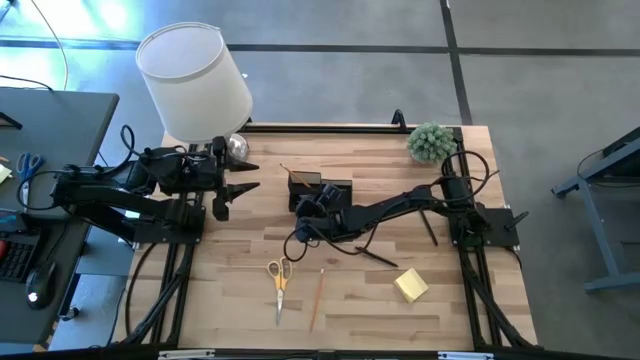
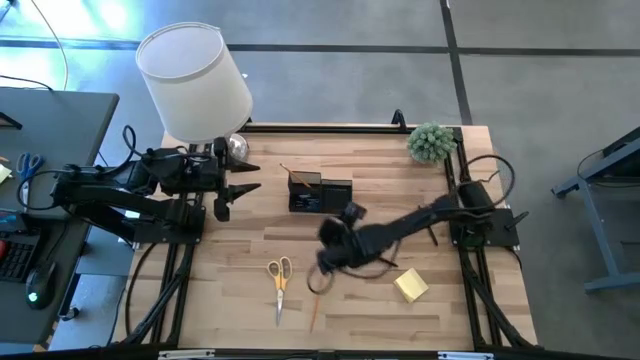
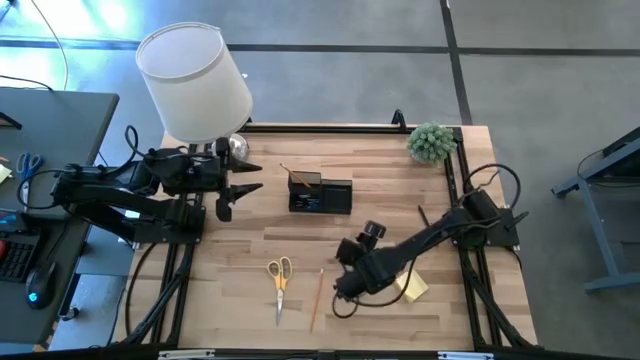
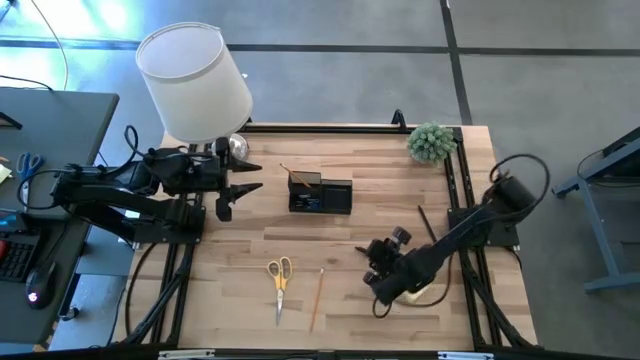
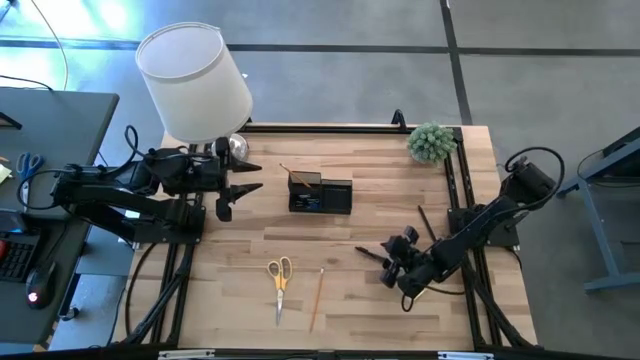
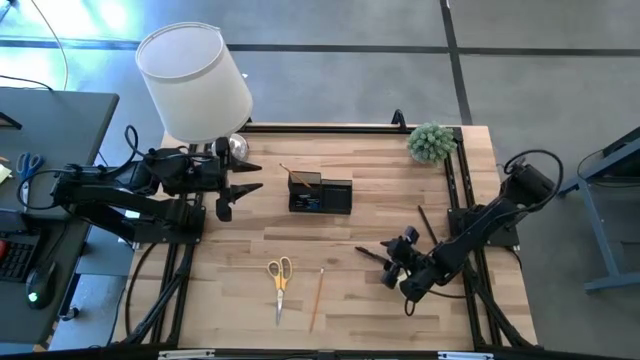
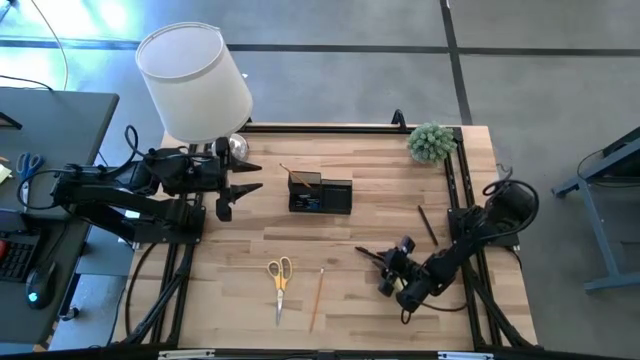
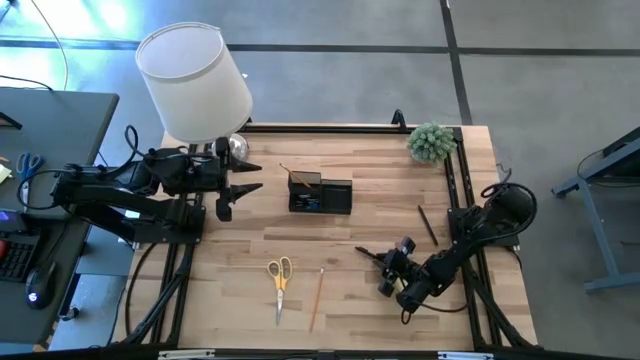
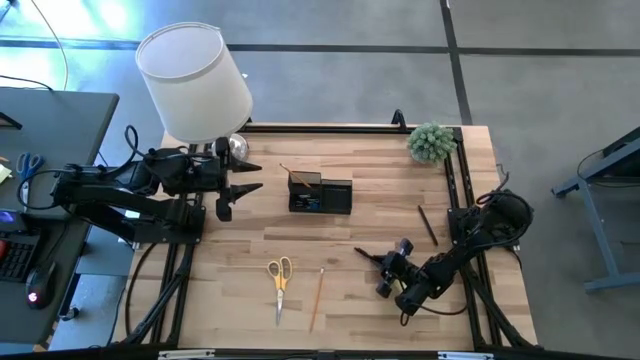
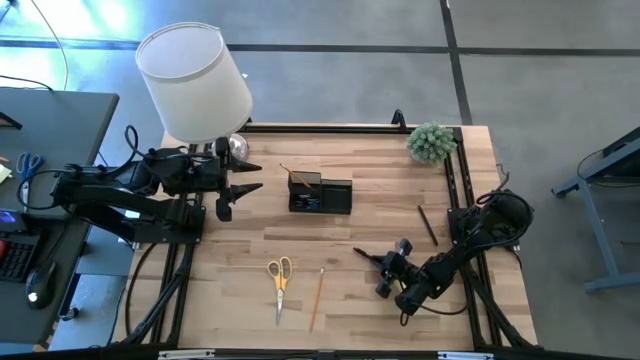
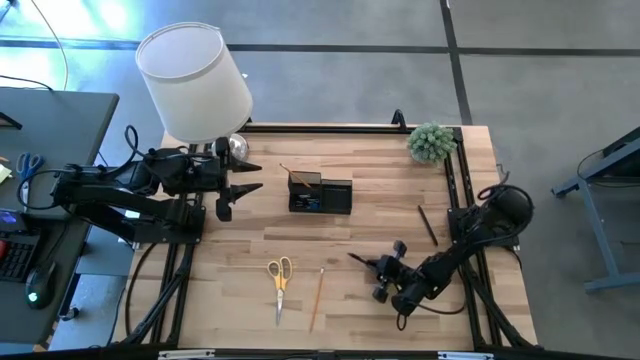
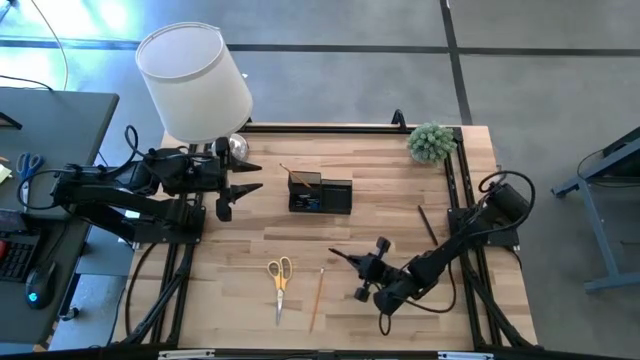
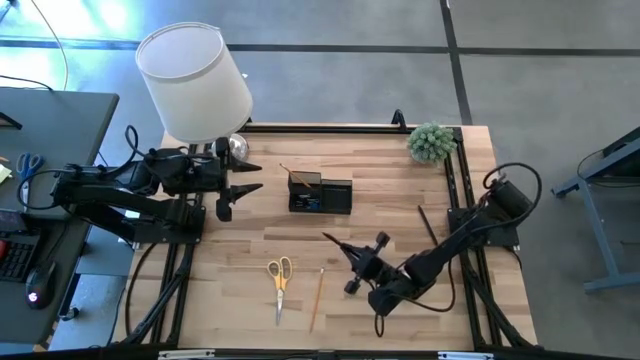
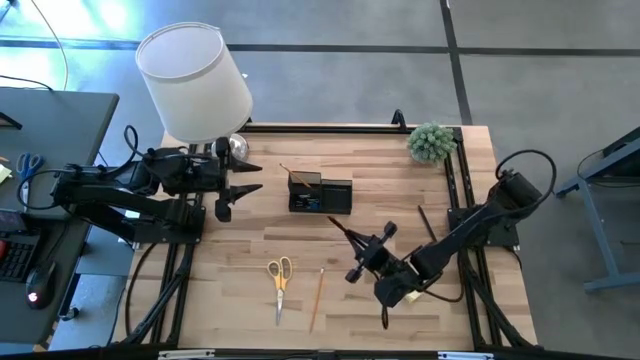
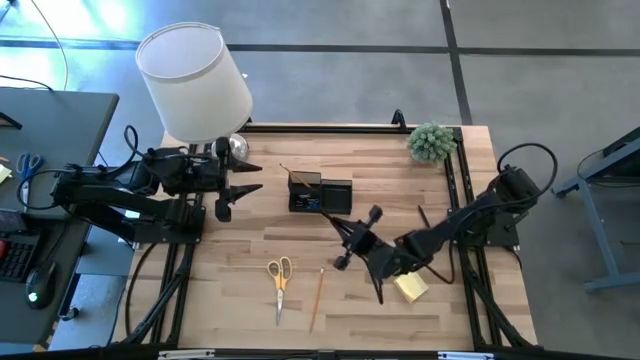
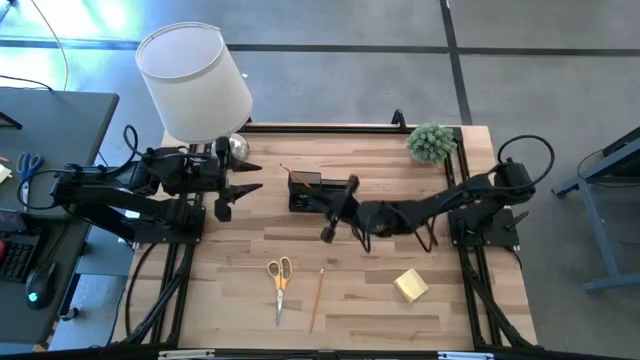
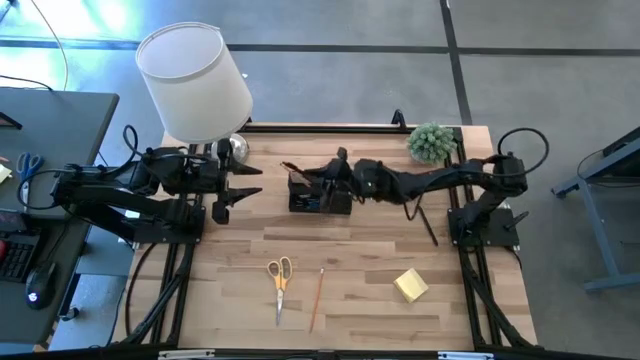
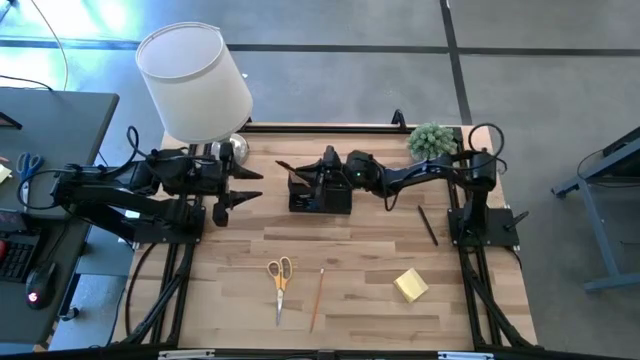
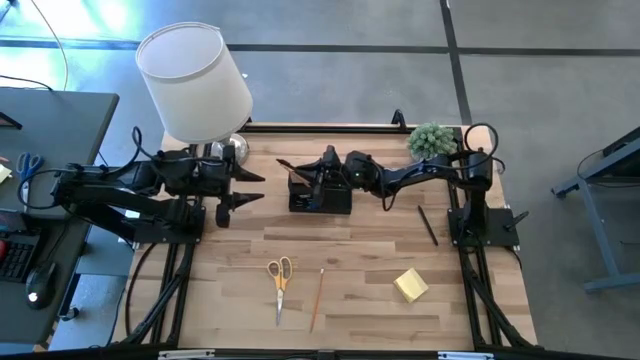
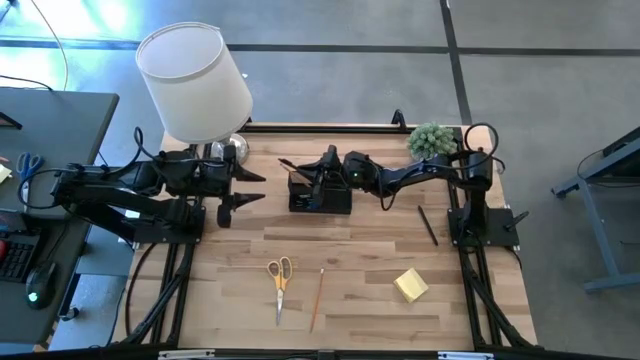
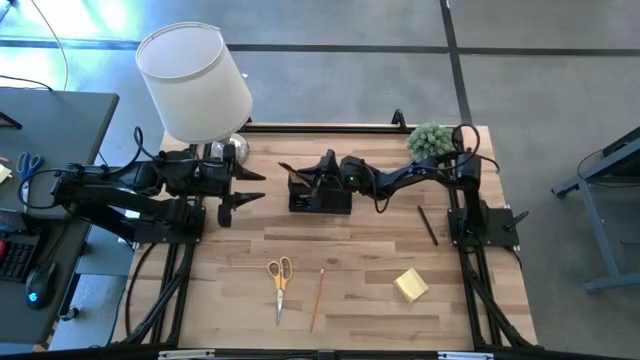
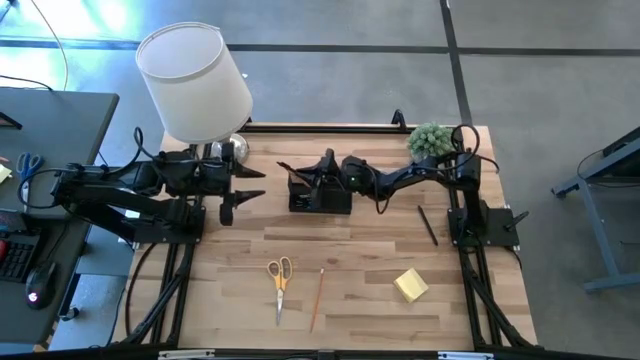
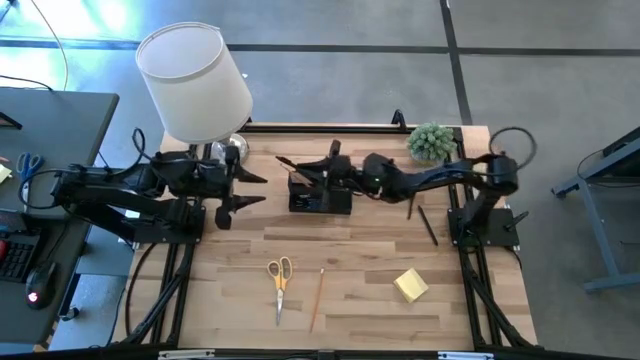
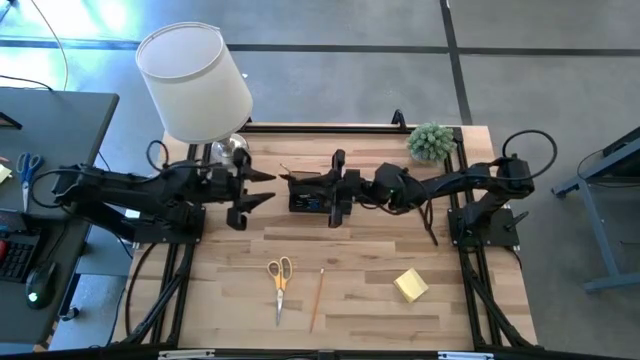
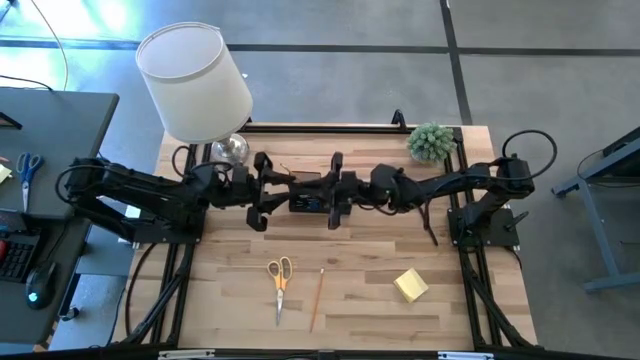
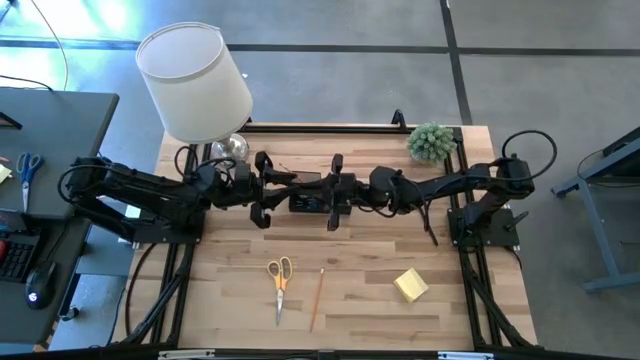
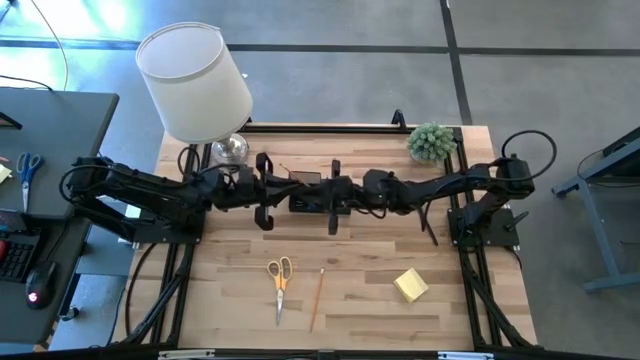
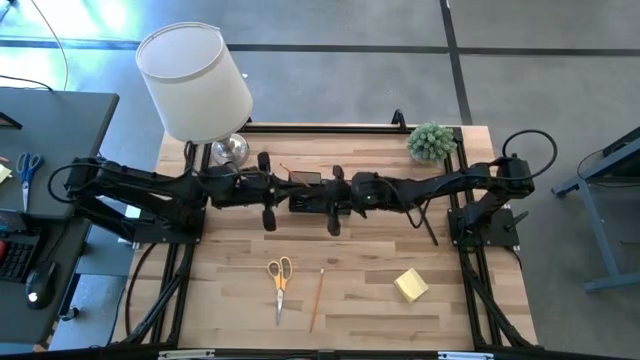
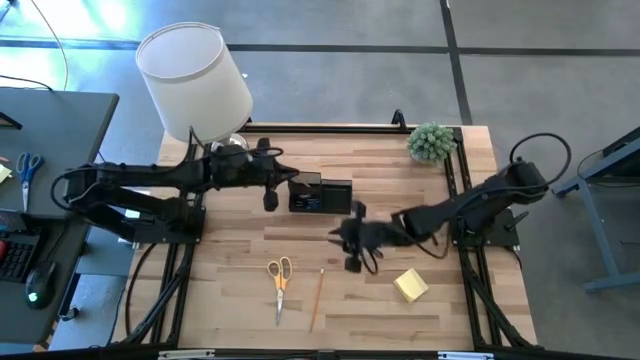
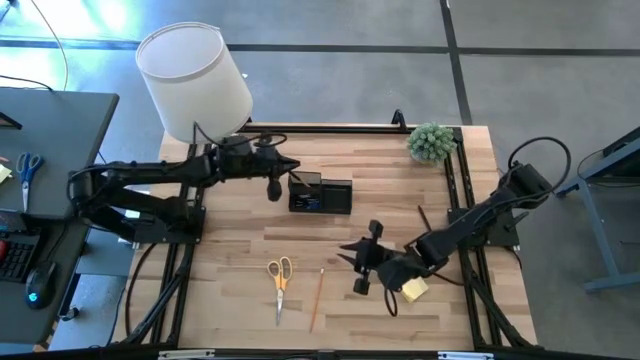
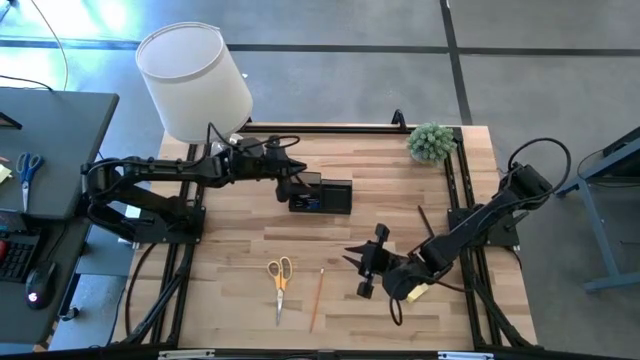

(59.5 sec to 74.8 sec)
Task: Pick and place office supplies into organizer
Put the left black pen into the desk organizer

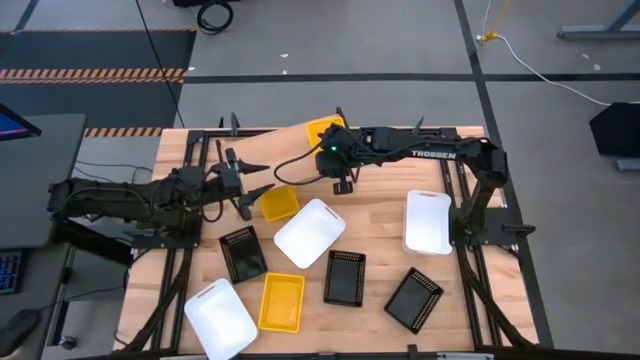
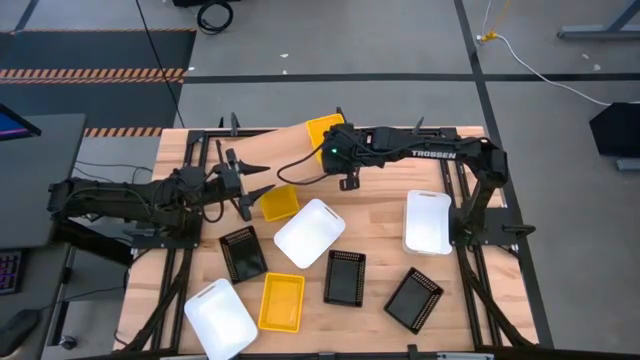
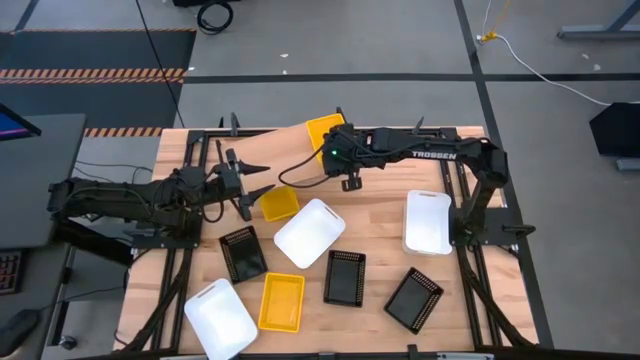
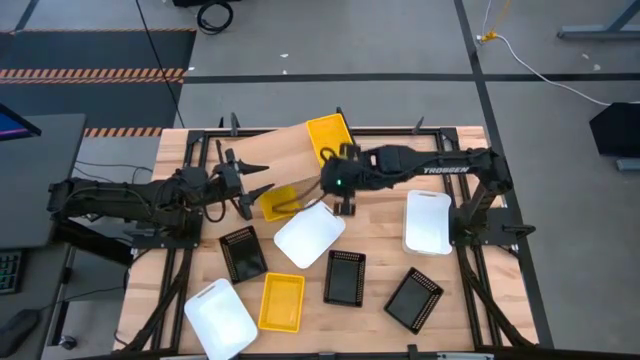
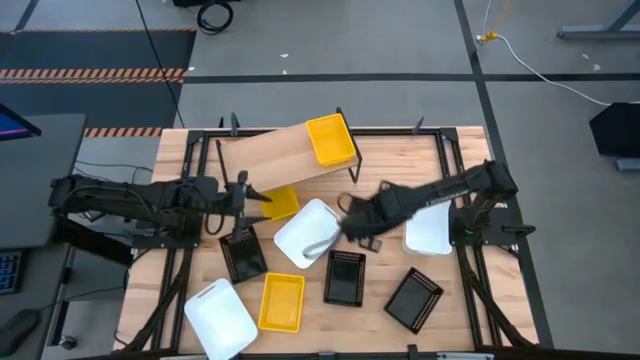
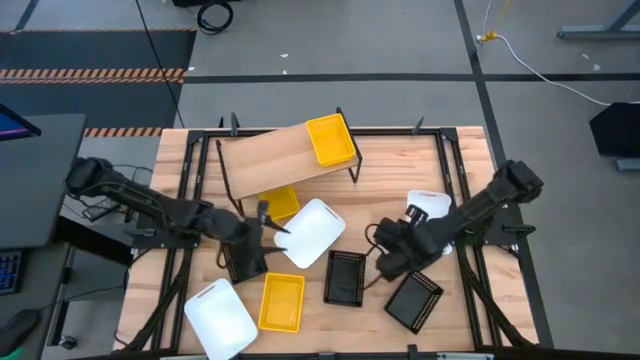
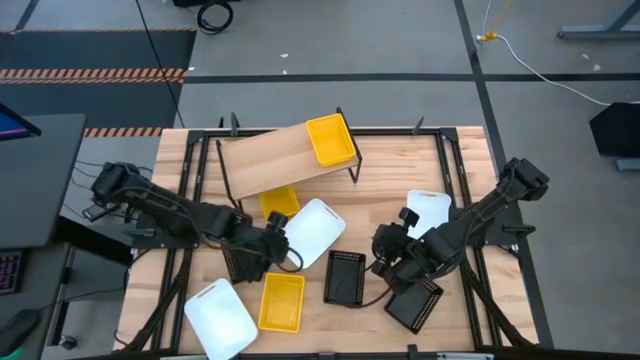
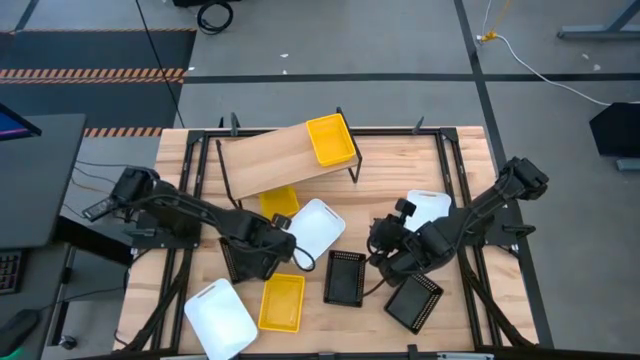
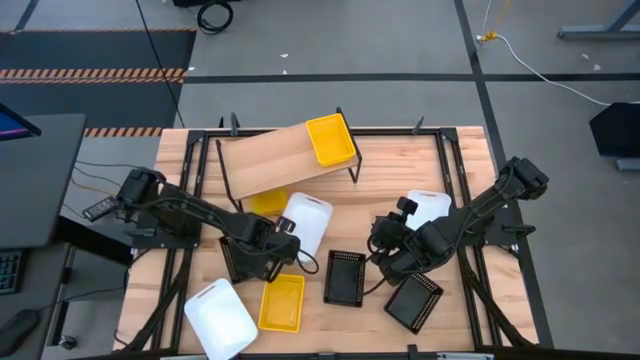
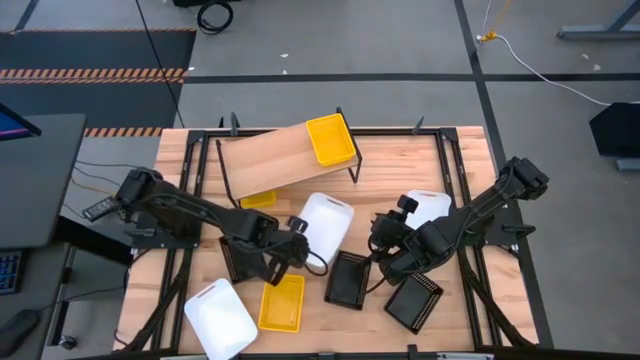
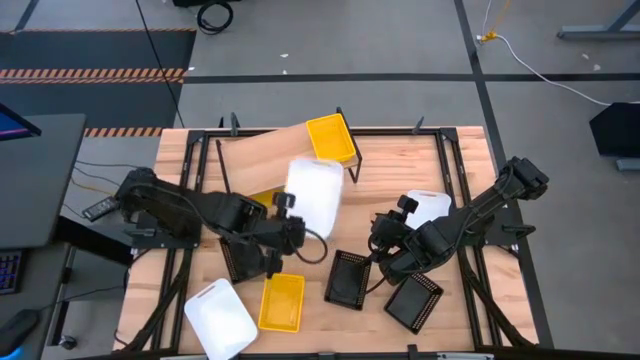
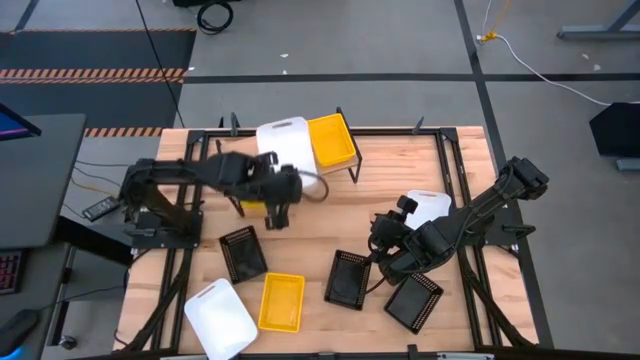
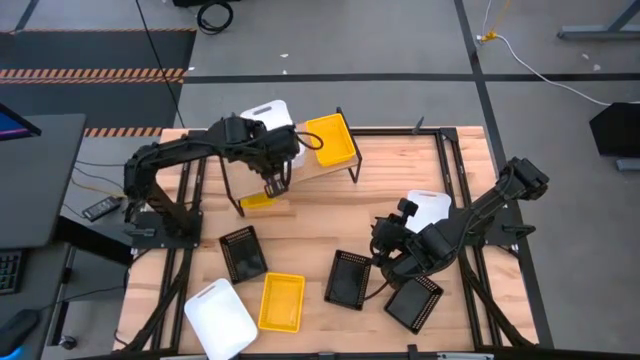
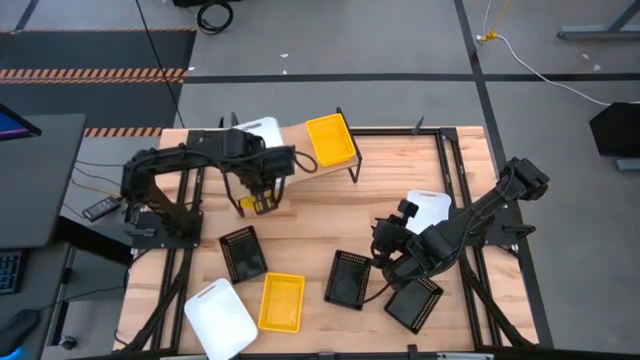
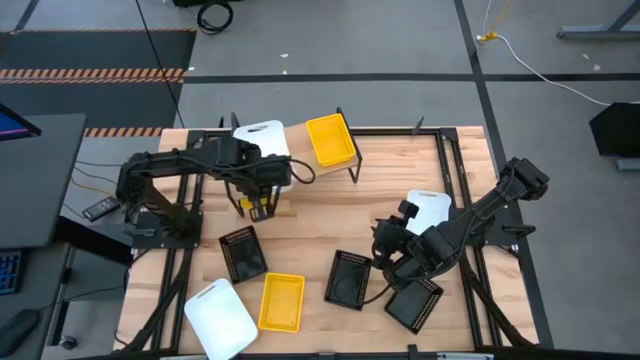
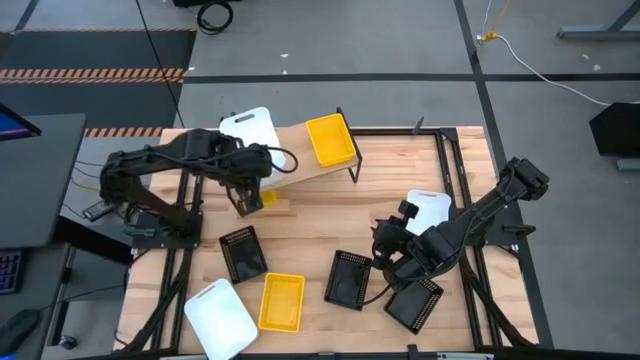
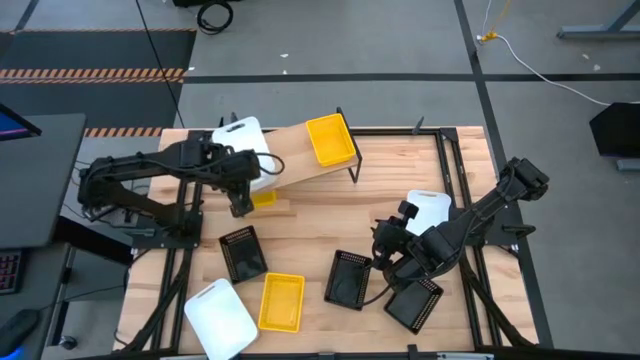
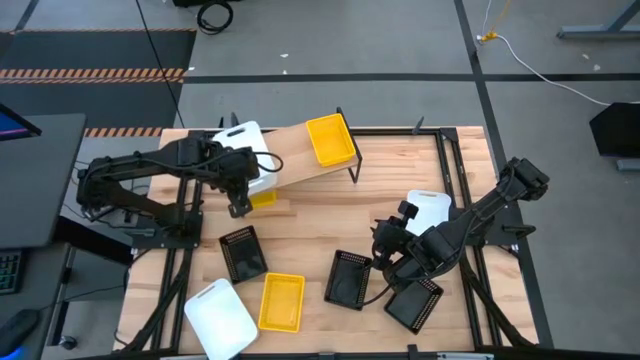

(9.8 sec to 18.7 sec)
Task: Stack baskets on shelf by color
Put the center white bin on the shelf
